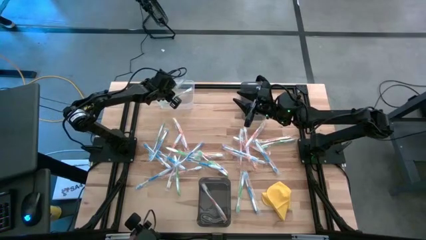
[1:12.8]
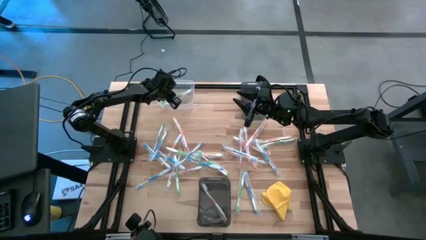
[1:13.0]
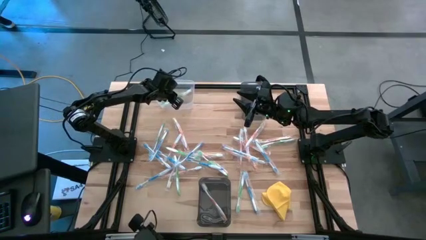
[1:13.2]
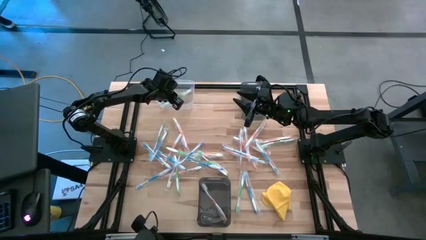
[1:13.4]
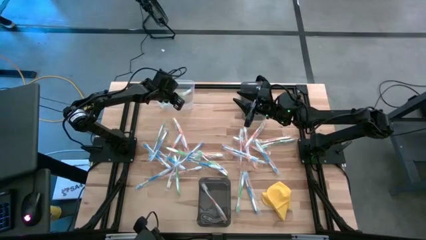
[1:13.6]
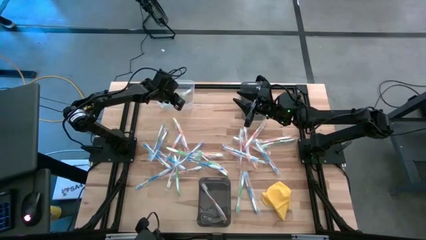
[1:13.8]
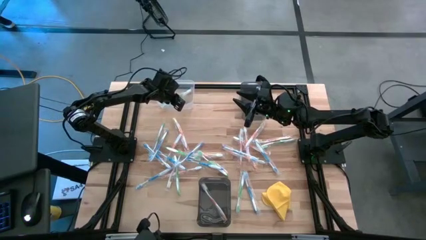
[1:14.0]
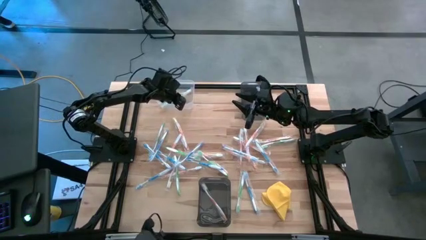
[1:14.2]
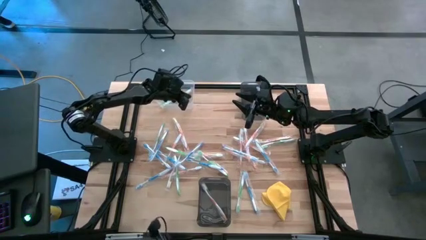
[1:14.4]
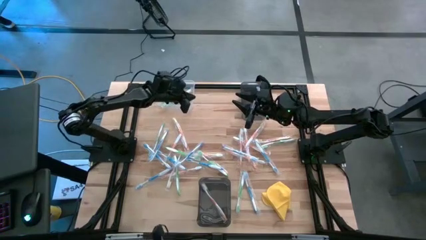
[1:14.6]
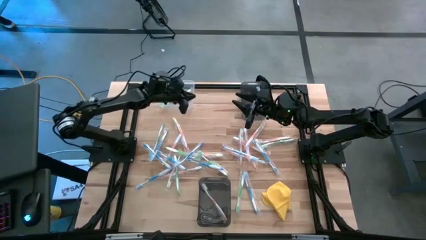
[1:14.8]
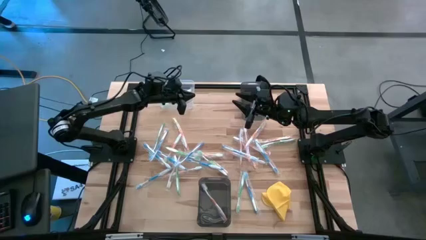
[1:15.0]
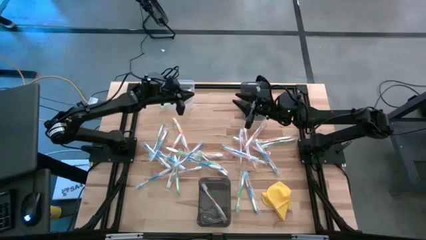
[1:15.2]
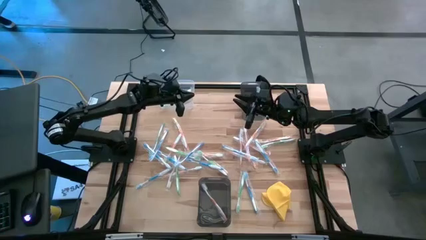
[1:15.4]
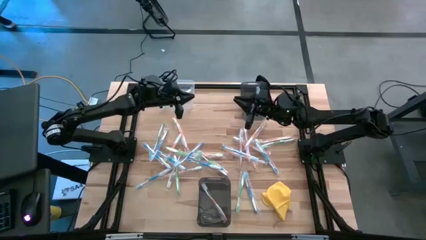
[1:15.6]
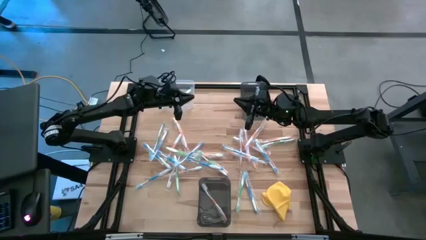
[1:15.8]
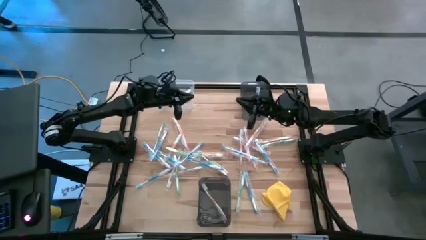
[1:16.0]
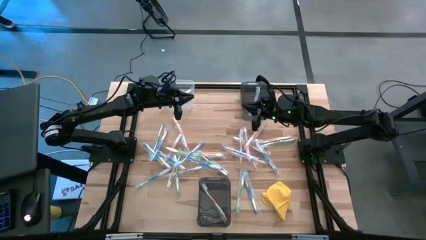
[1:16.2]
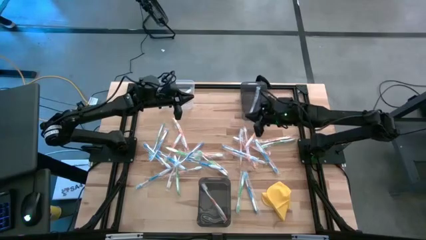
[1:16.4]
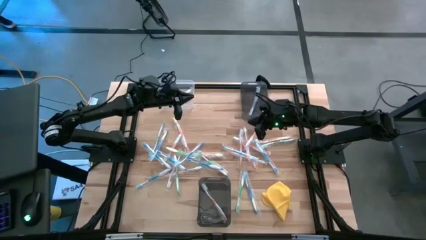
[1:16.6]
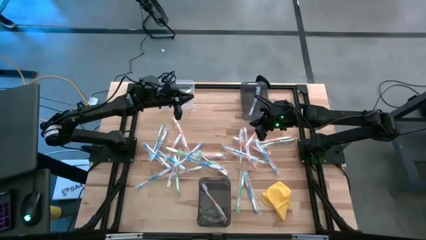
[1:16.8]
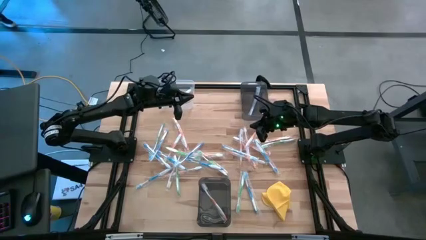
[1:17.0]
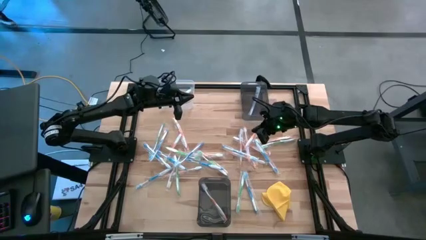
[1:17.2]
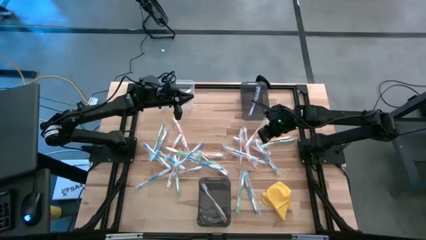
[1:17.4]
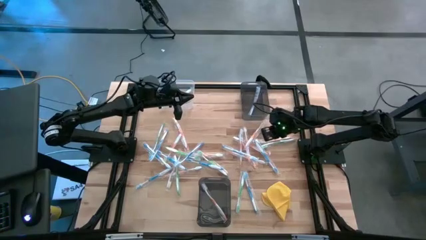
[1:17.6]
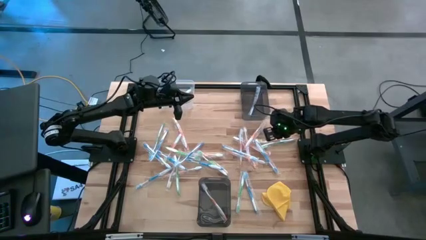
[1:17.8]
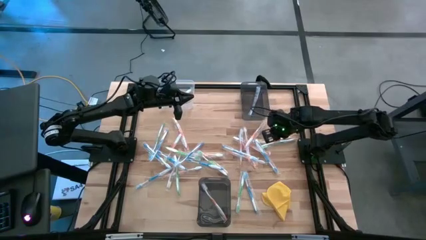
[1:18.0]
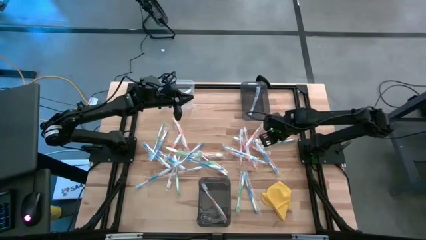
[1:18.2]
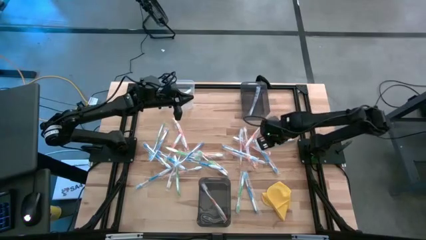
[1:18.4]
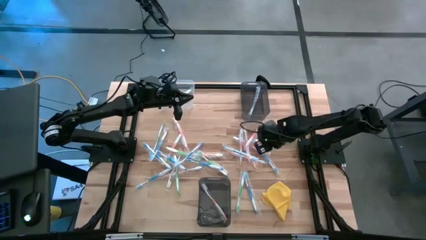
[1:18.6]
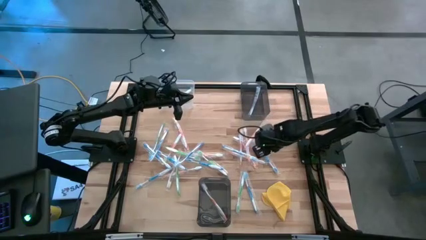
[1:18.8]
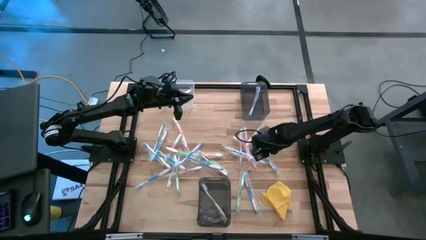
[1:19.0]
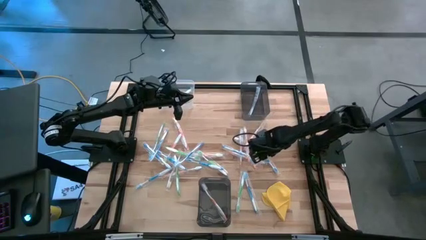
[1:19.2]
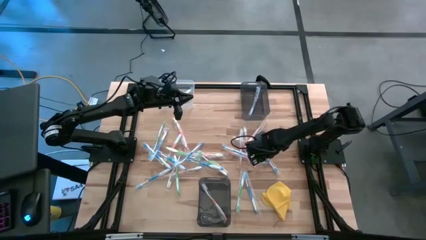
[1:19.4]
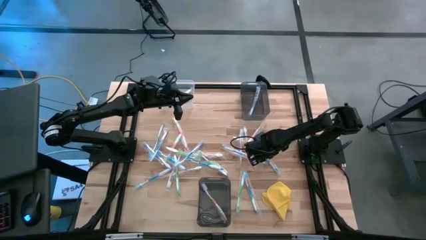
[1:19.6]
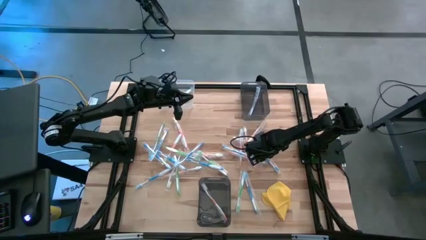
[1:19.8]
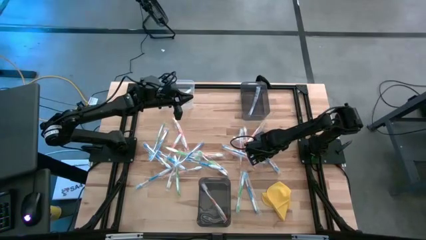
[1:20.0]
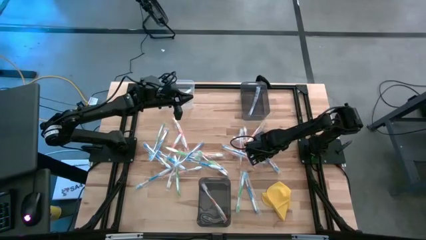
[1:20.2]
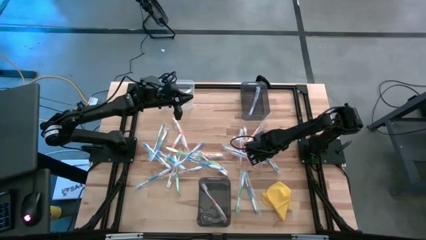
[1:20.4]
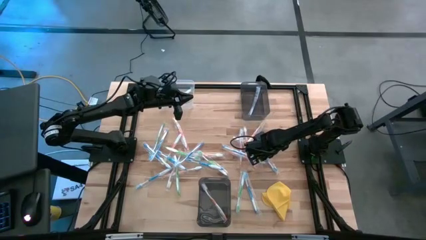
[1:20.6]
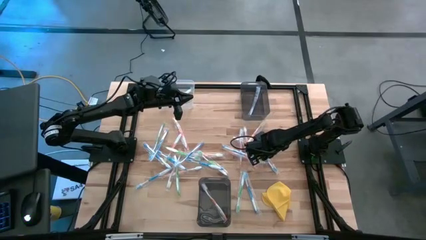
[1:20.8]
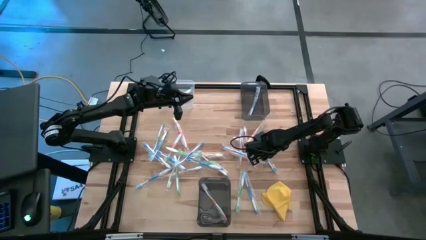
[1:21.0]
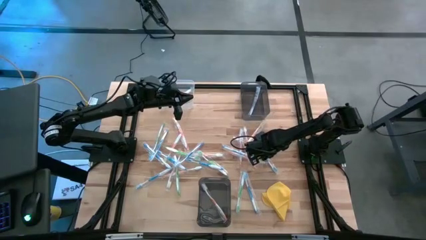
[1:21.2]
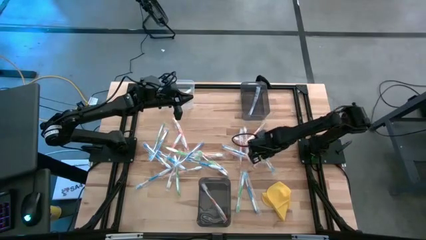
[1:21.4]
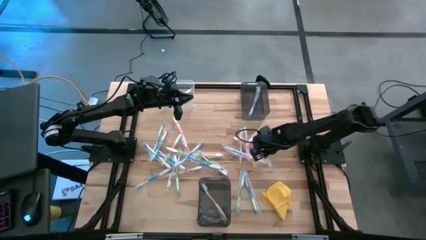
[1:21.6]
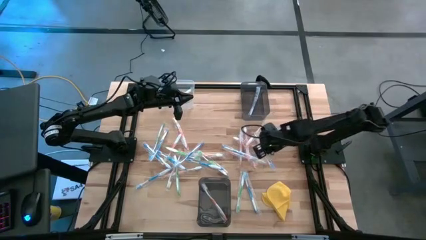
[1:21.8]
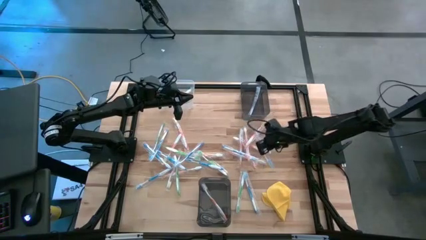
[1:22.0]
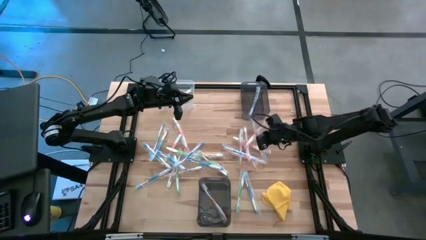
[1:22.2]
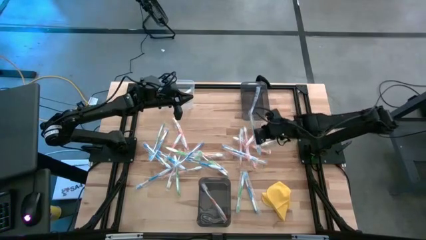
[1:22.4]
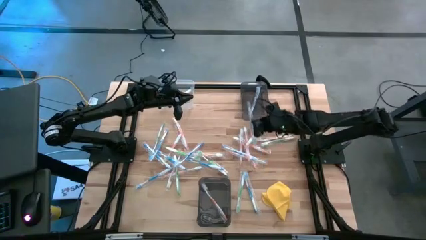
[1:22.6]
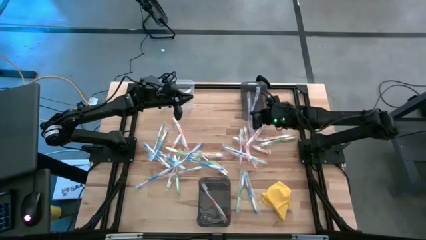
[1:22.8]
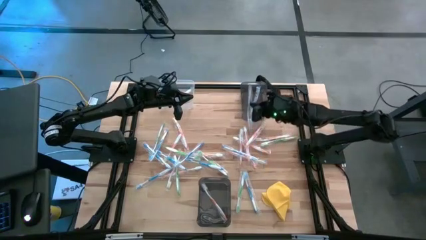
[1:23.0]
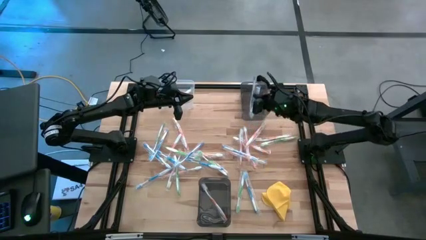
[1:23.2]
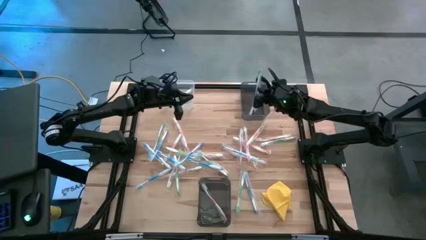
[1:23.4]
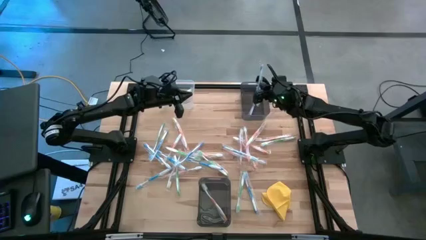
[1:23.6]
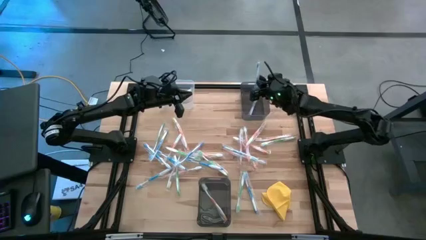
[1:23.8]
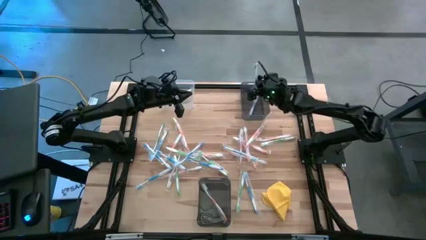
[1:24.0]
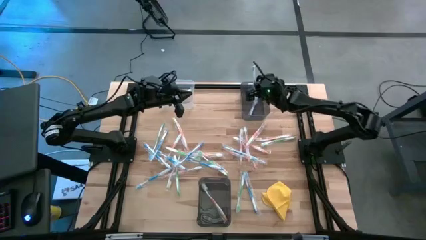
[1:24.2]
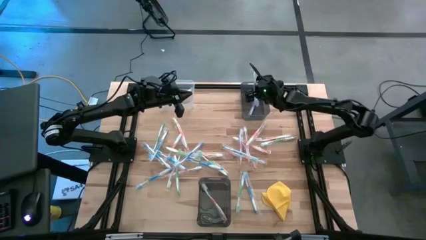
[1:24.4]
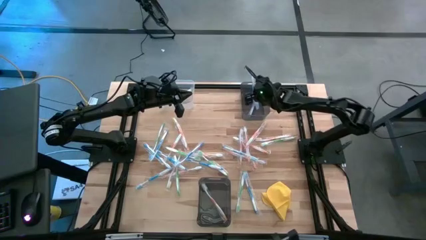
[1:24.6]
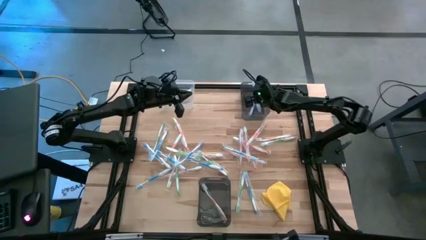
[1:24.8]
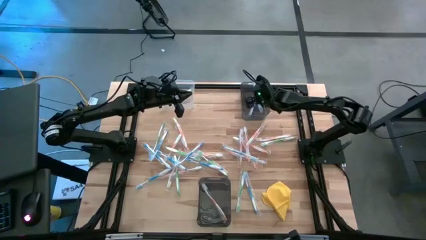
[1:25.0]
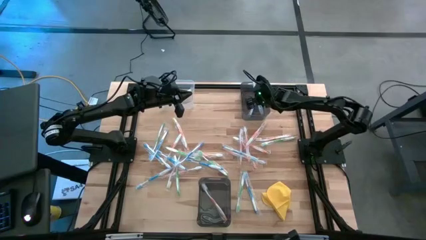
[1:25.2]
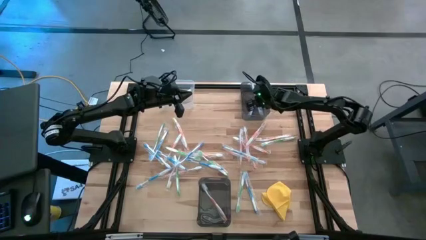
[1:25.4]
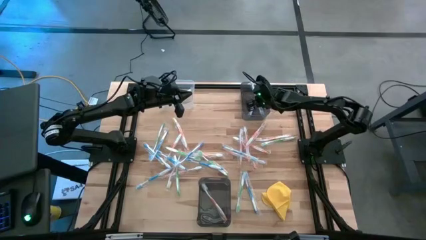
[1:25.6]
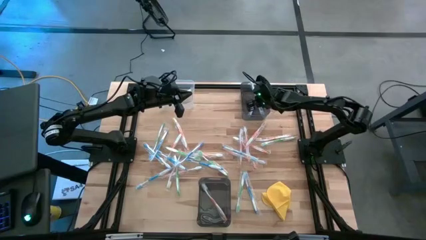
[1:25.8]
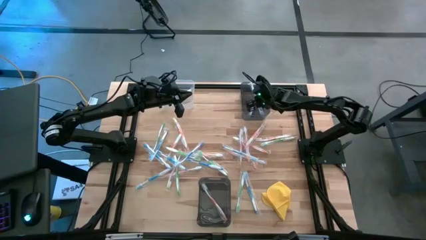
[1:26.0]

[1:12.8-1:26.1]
Task: Pick & Place Toothbrushes
Put the blue toothbrush into the top black bin
